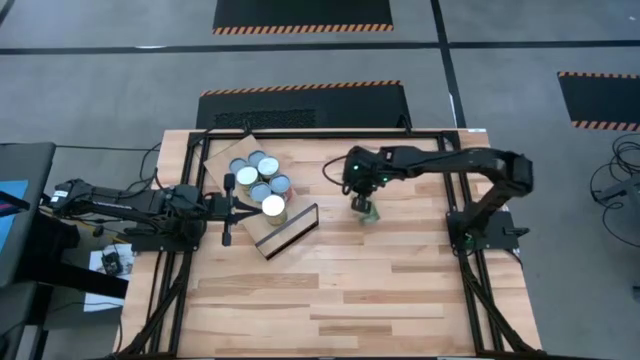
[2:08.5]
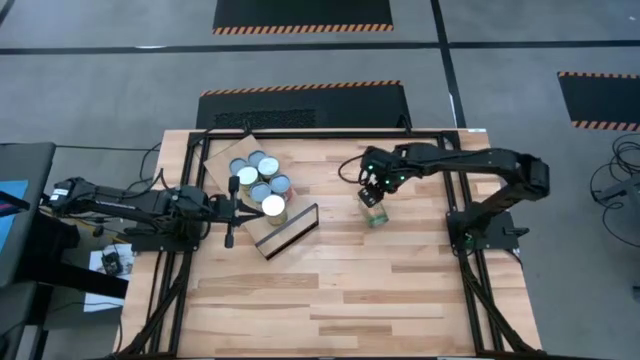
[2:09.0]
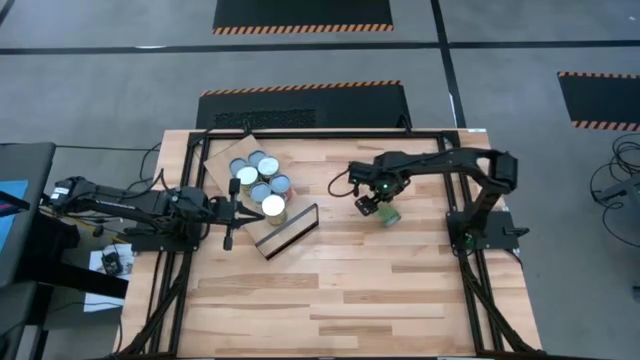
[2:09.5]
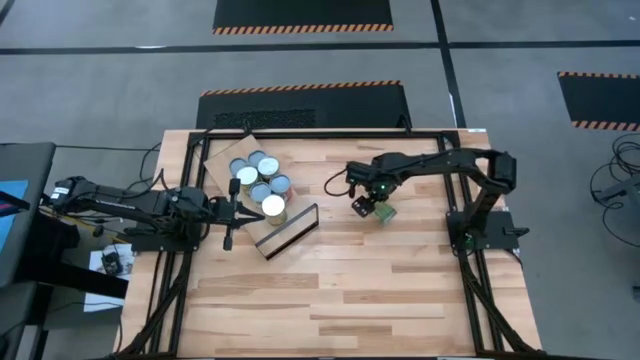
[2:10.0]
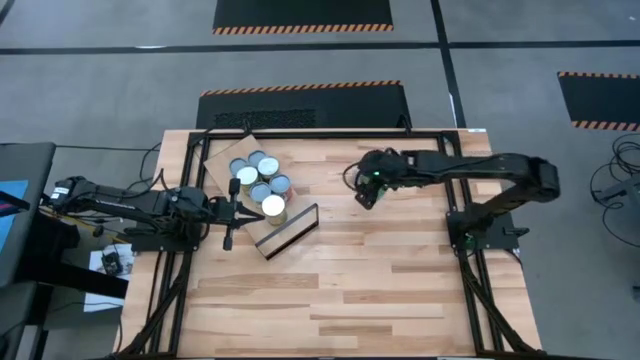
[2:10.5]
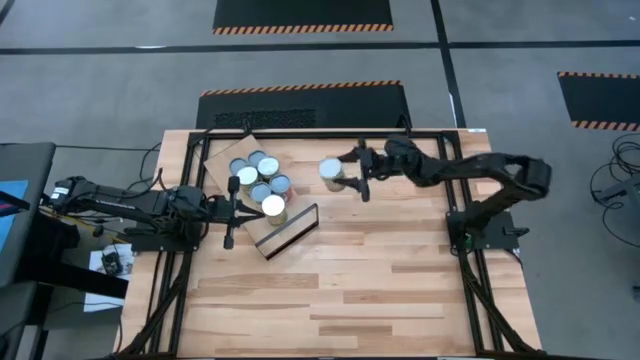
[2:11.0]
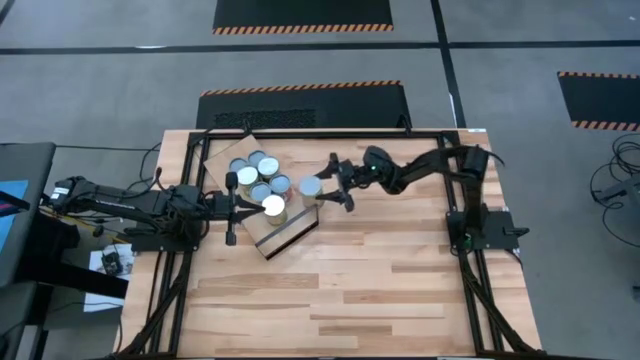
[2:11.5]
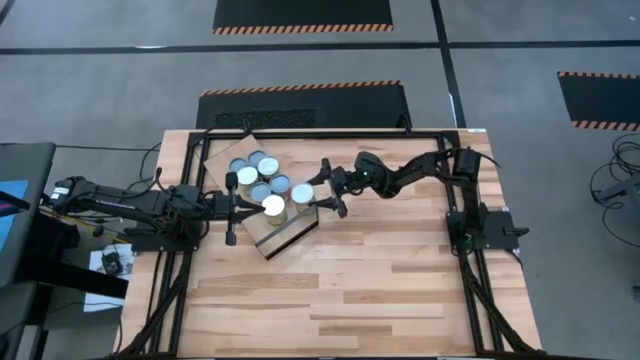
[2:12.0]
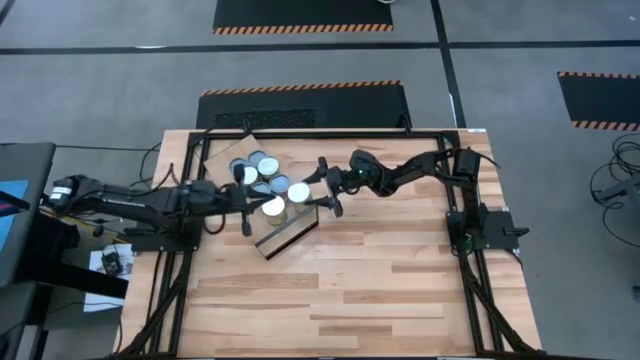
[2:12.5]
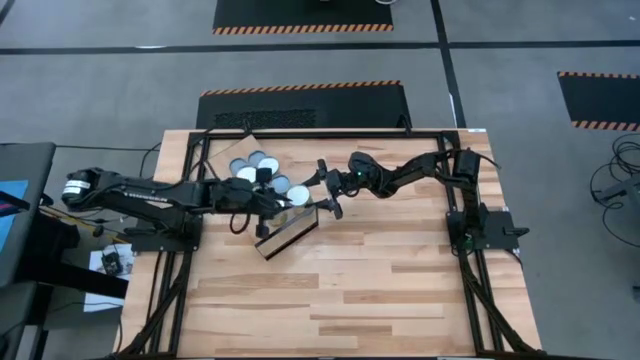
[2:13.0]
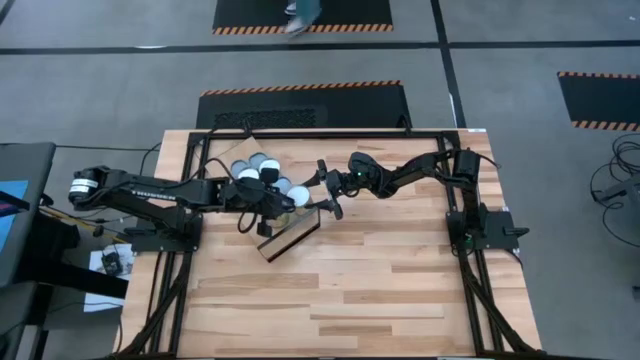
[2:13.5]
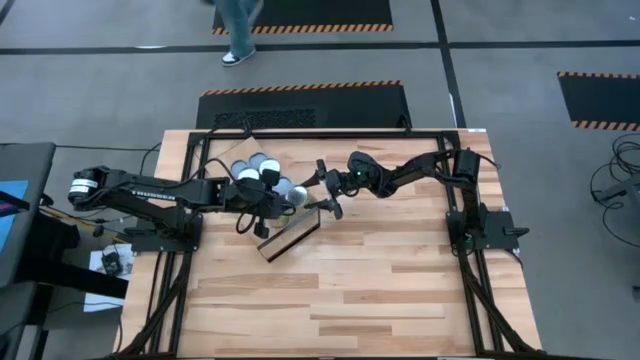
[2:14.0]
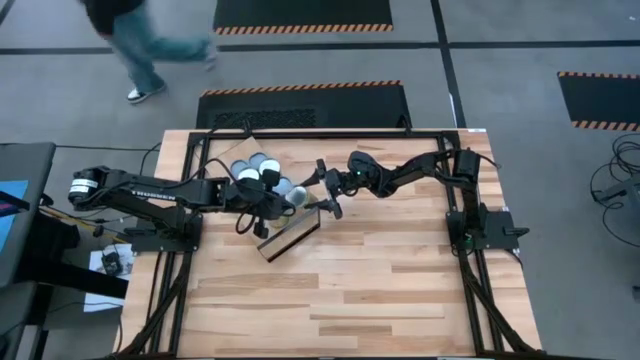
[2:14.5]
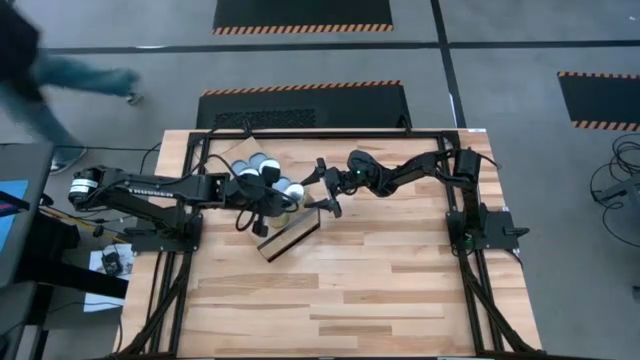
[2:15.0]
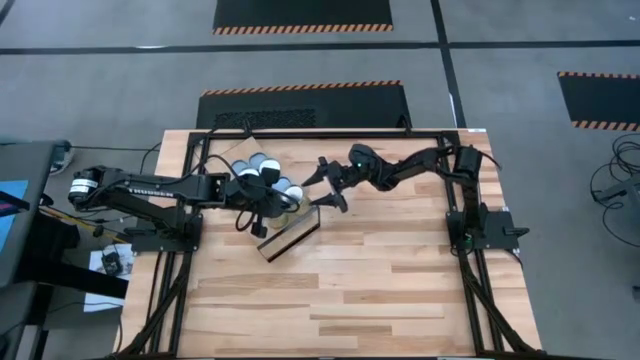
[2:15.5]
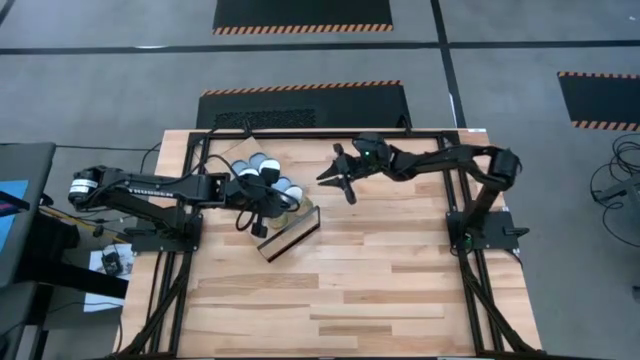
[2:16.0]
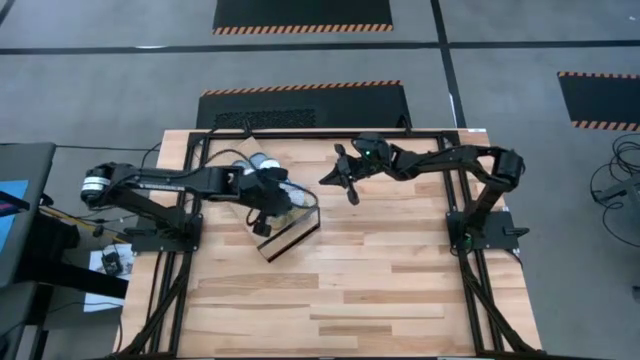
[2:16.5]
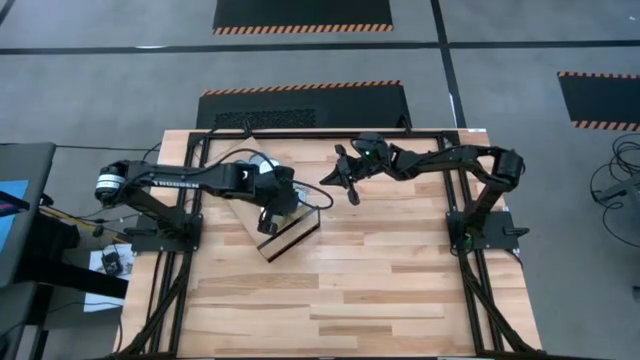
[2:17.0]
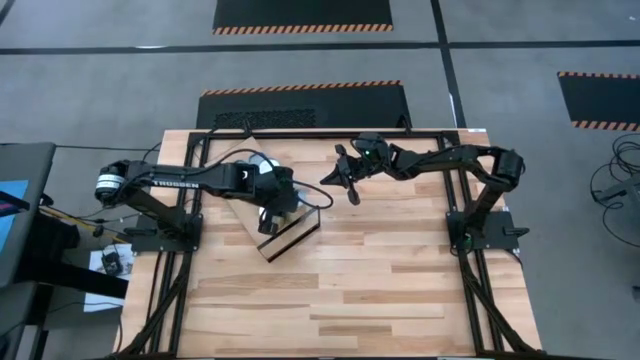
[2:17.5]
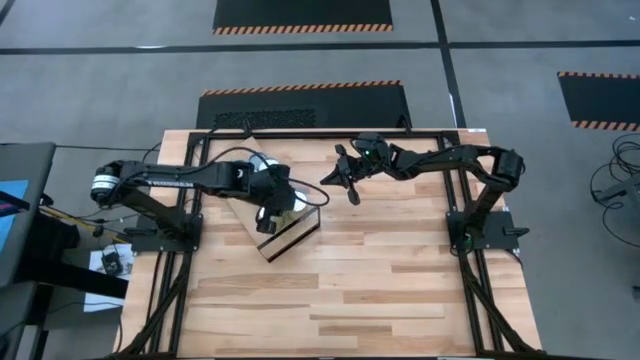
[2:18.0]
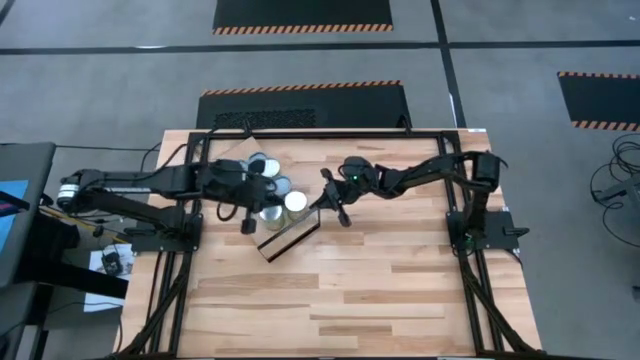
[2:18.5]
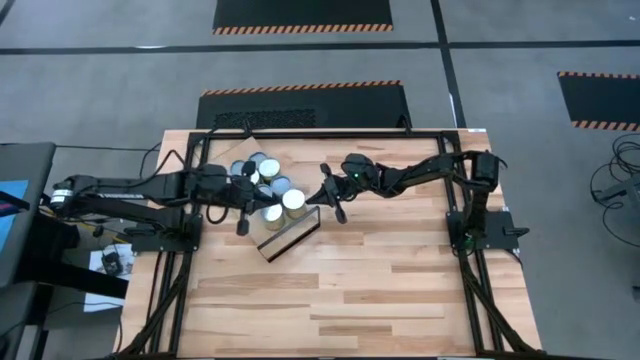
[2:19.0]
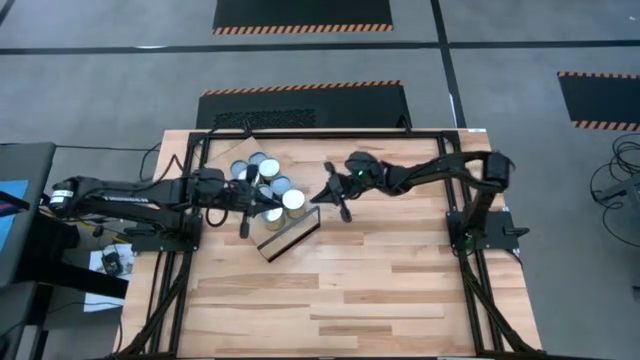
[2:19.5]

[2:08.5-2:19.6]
Task: Pick and place cans onto a shelf
Put the top large canned oranges on the shelf

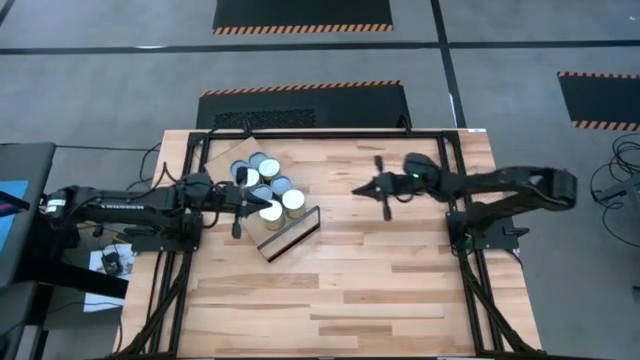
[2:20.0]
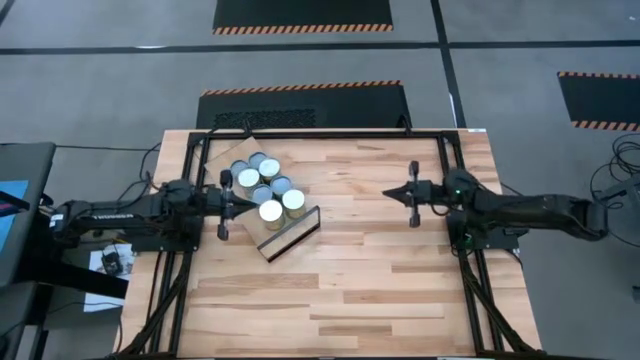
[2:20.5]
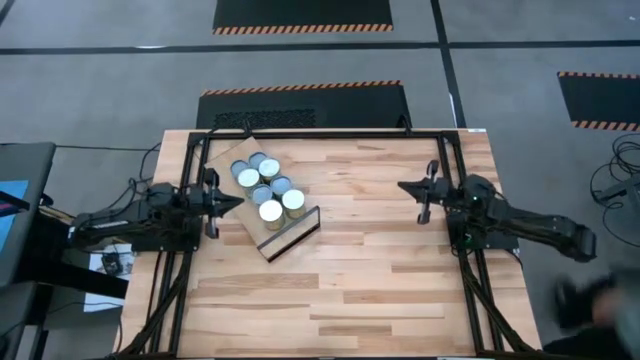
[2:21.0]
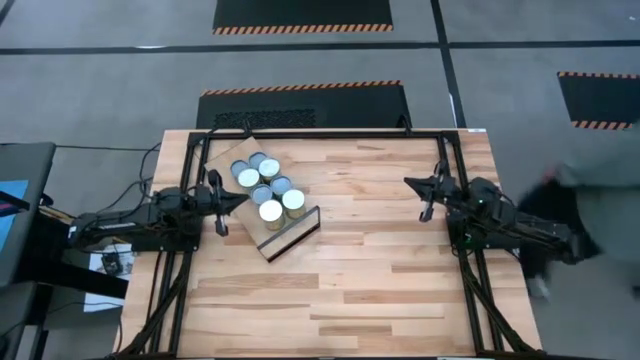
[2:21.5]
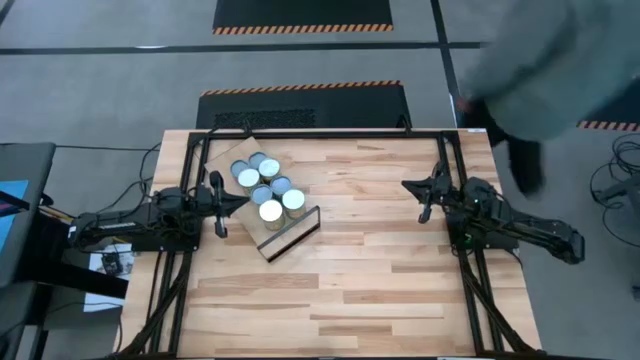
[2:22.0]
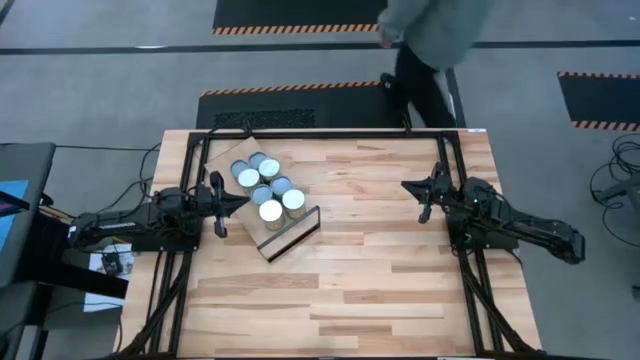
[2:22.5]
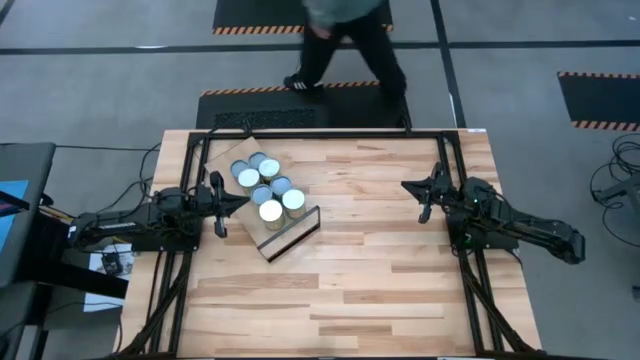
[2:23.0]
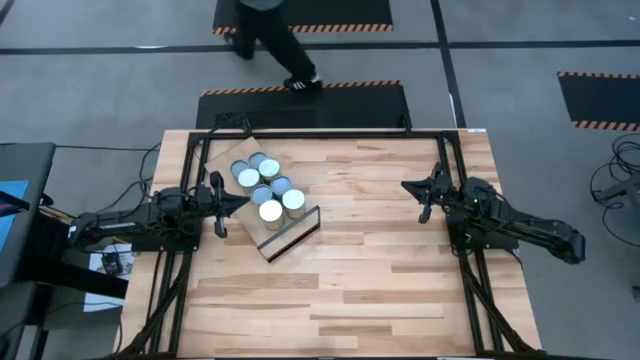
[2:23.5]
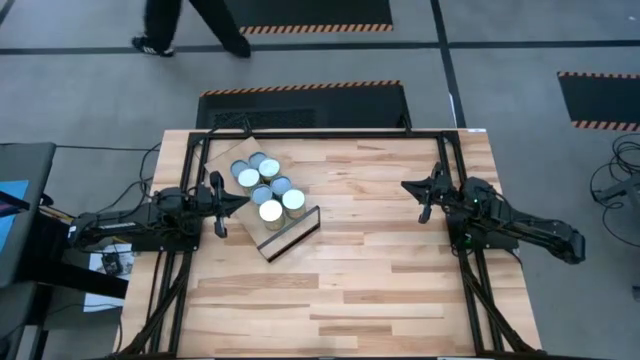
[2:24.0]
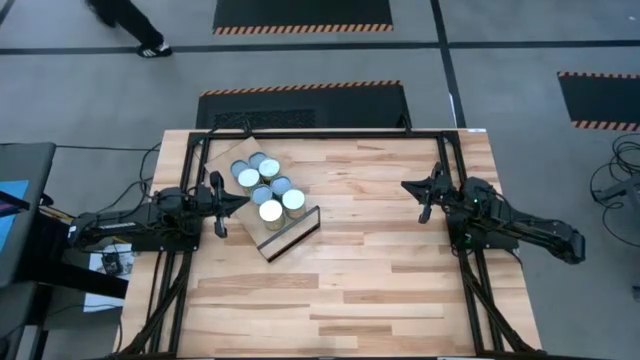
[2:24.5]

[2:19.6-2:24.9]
Return to Home Position

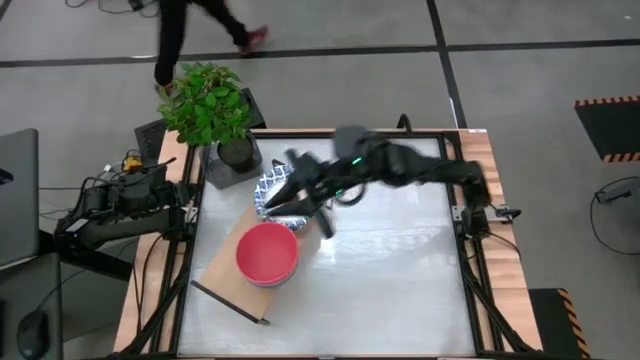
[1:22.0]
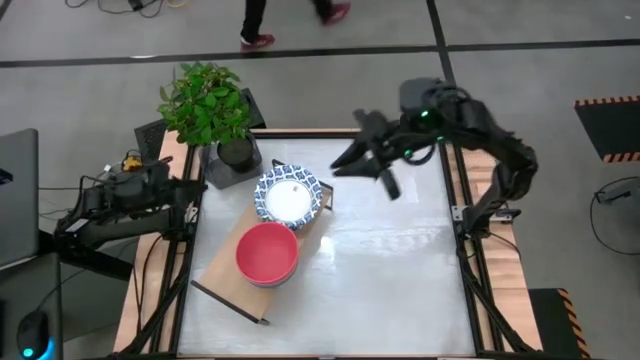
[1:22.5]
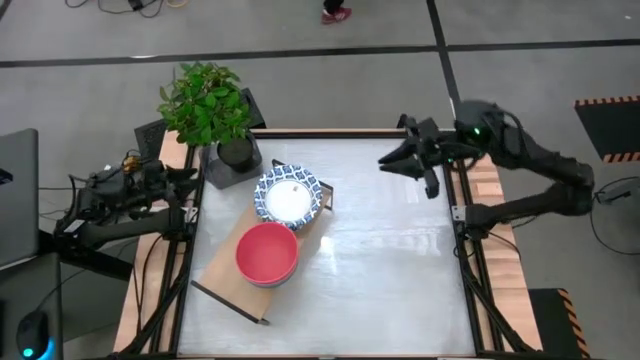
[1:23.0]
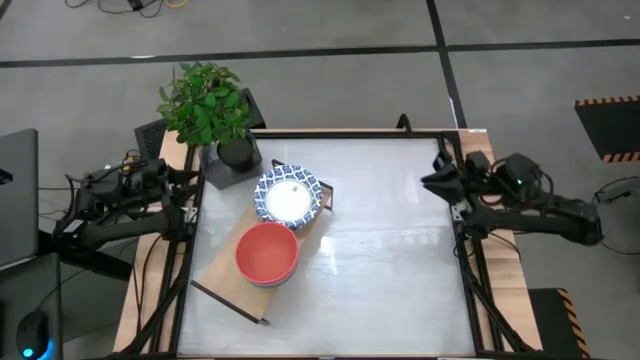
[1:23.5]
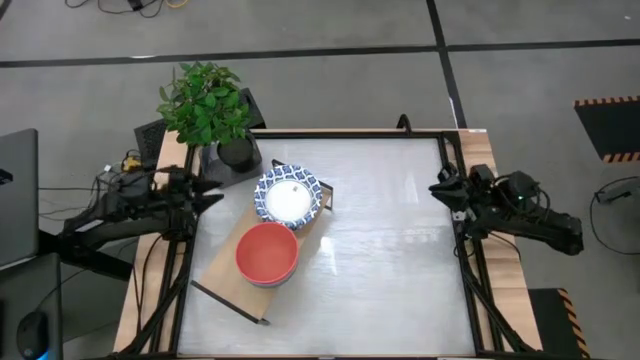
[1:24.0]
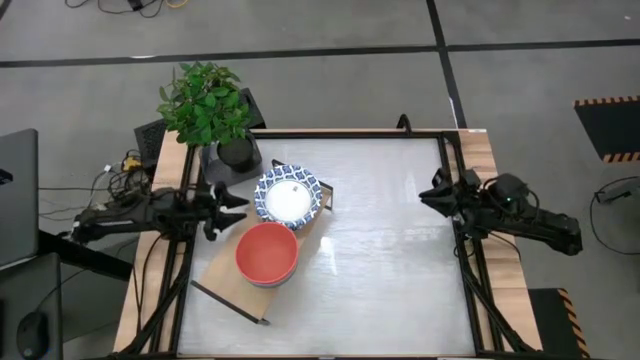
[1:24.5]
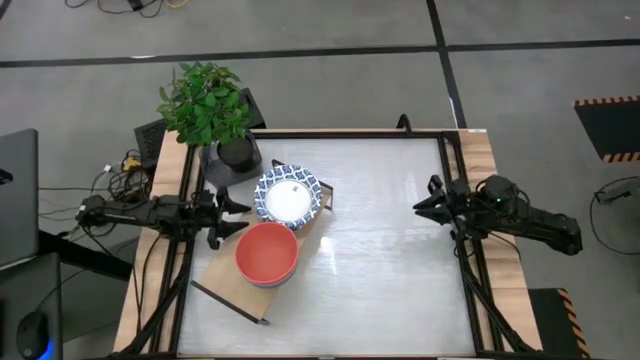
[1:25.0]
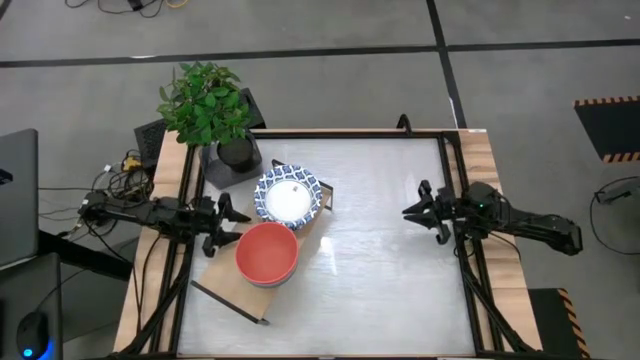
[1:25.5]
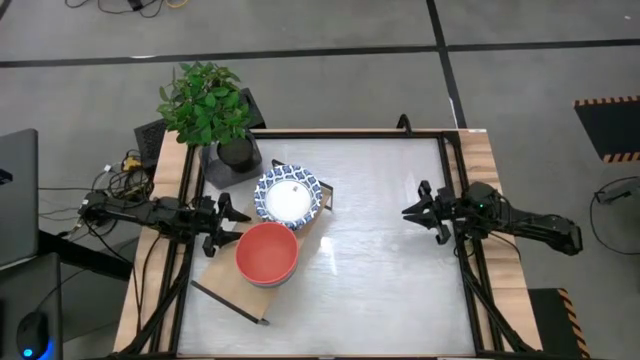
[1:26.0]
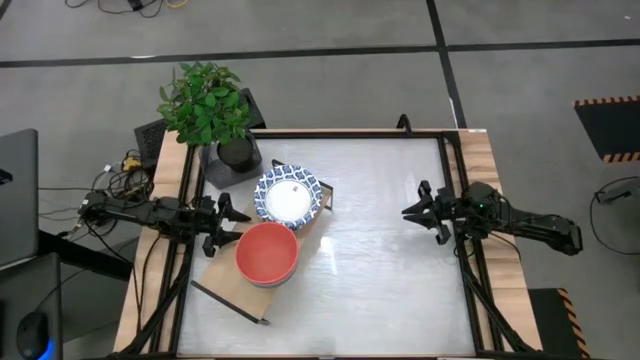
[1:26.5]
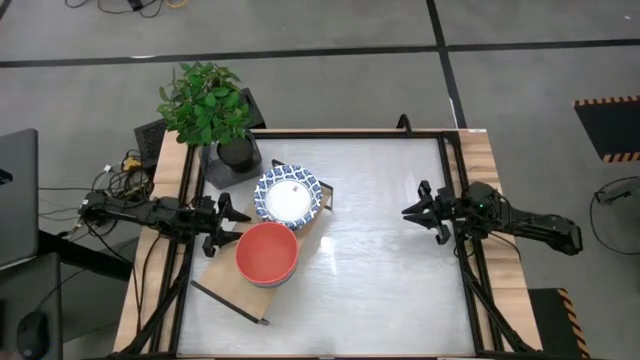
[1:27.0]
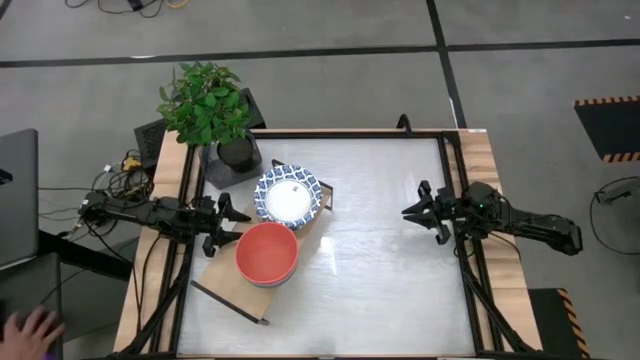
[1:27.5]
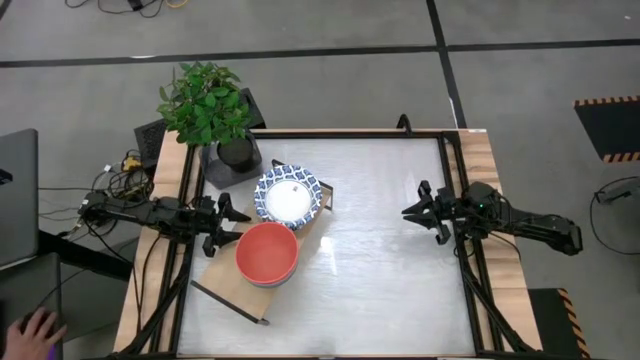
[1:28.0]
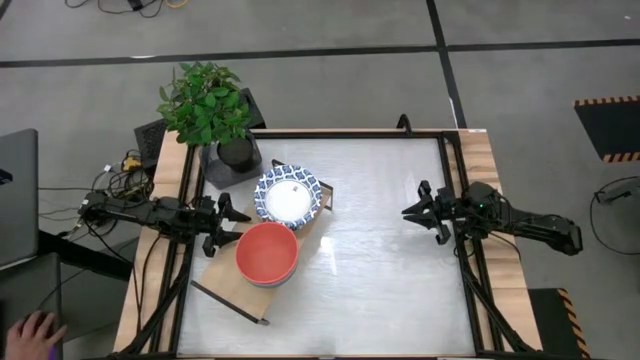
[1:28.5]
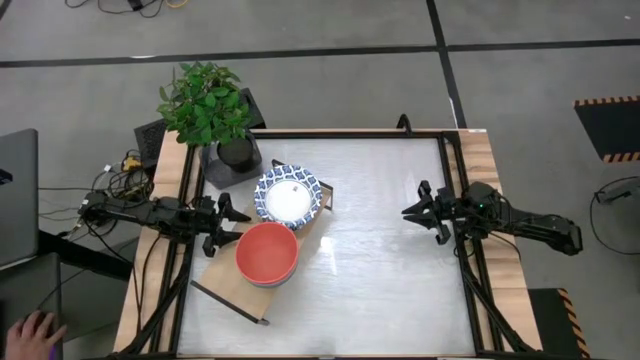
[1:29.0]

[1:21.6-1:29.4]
Task: Place and stack bowls onto a shelf
Return to Home Position
